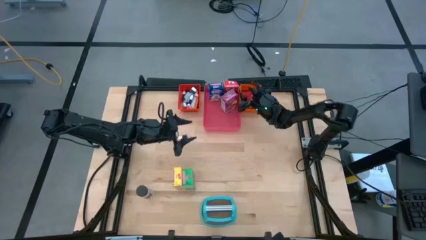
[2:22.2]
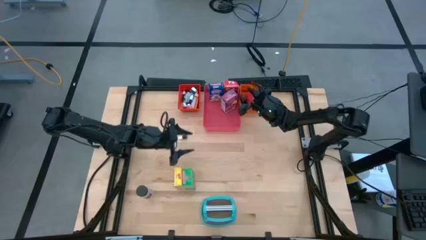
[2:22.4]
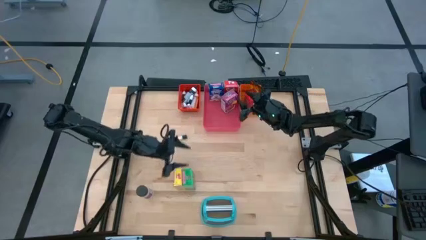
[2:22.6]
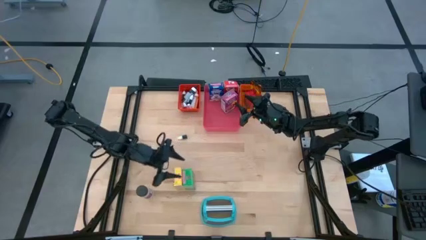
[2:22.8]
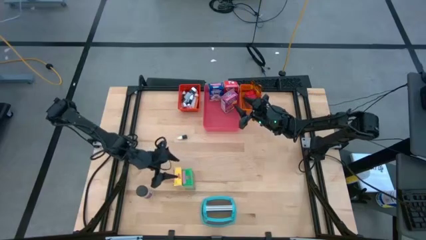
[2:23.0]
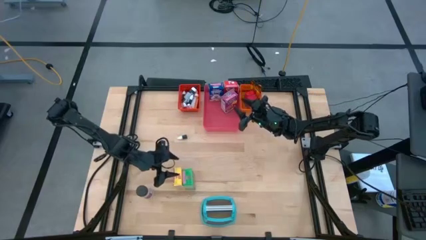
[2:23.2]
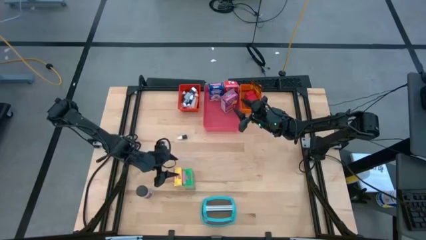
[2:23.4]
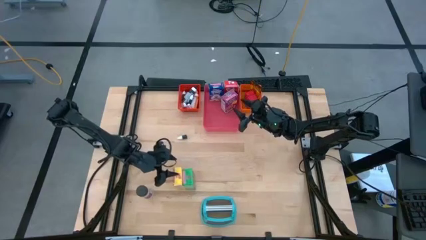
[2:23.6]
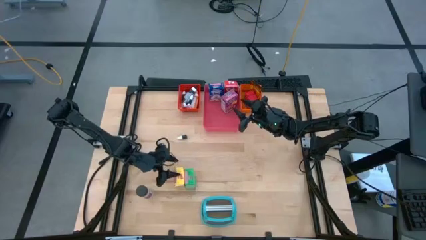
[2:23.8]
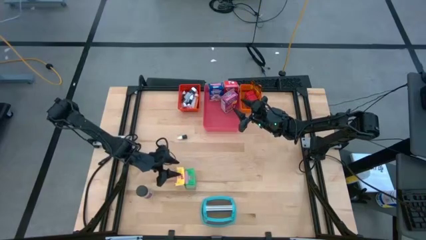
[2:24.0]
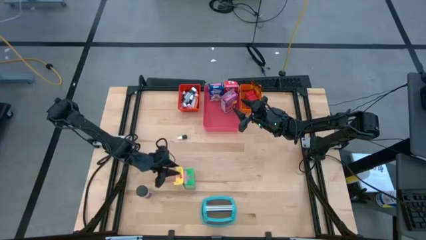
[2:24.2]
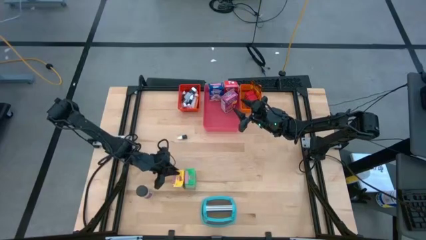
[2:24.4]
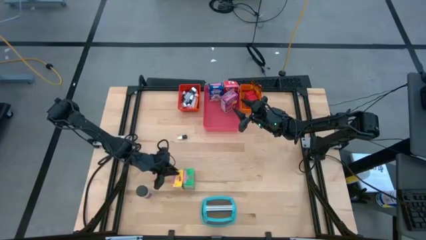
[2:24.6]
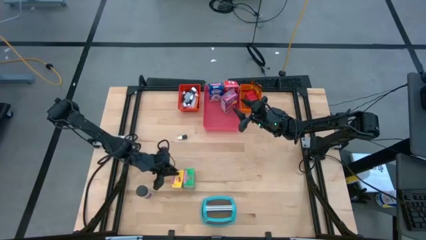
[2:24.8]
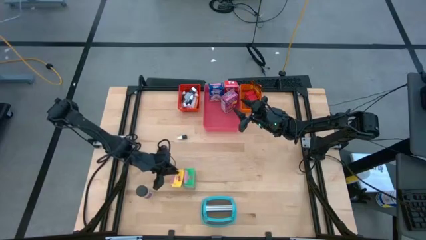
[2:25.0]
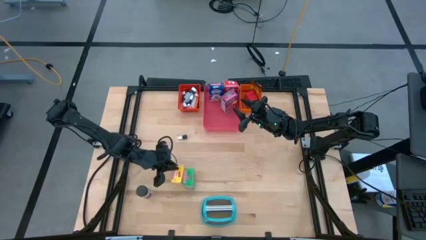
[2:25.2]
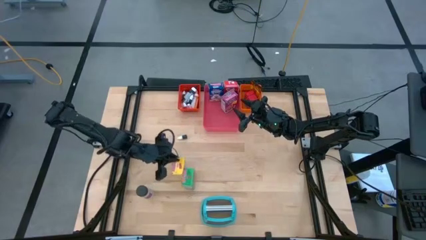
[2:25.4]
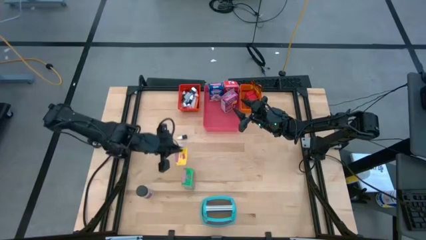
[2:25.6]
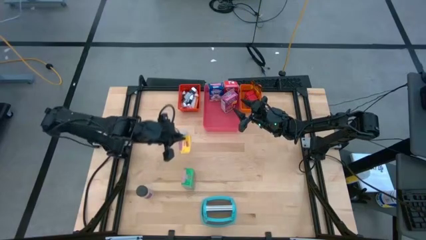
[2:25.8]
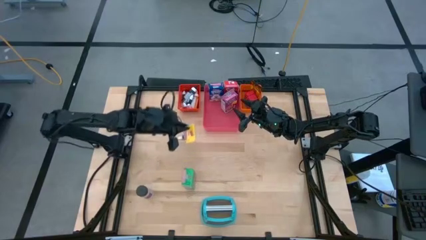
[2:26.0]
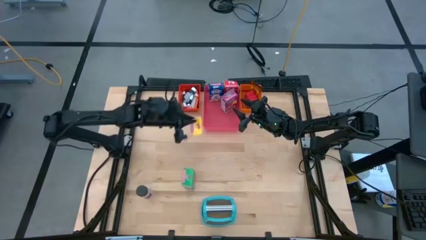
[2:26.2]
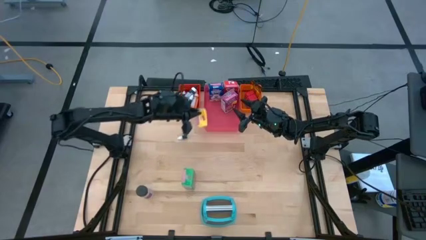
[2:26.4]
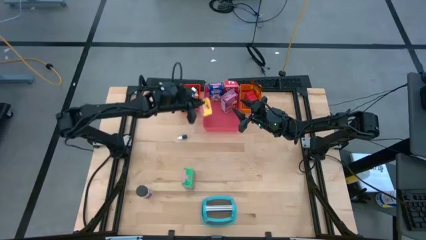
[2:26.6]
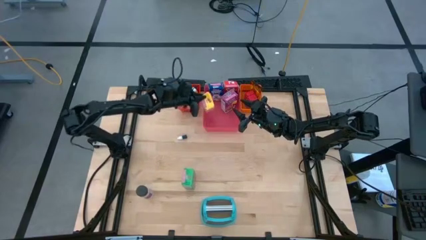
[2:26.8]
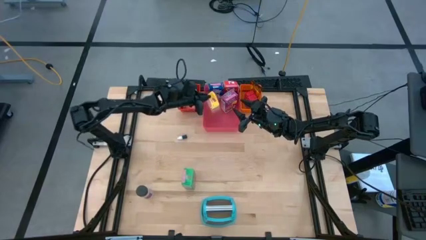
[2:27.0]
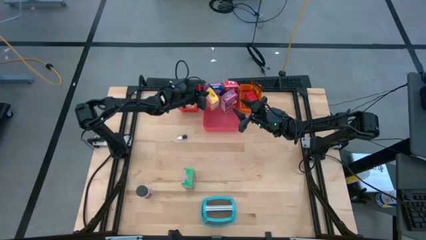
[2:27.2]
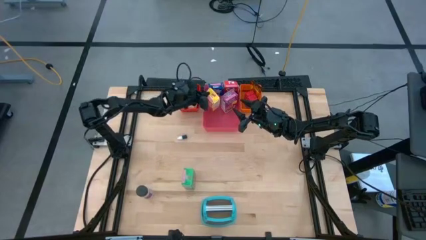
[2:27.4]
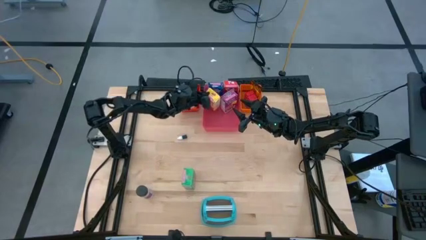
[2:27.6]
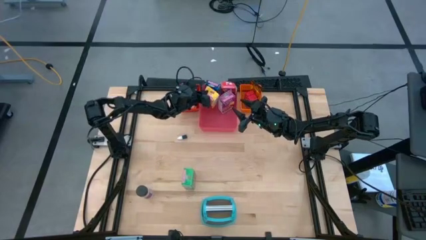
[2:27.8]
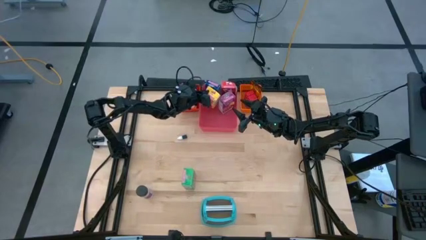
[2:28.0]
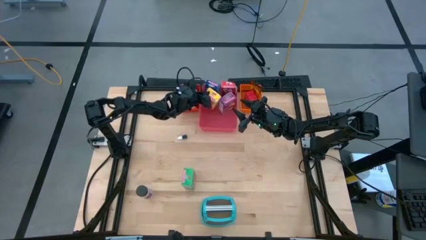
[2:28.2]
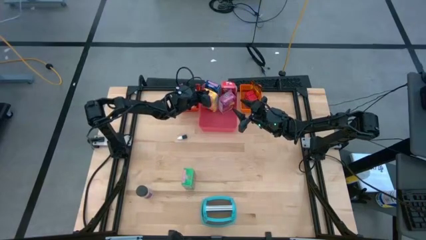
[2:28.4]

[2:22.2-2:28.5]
Task: Pick & Place Kitchen Items
Put the yellow cereal box into the pink bin

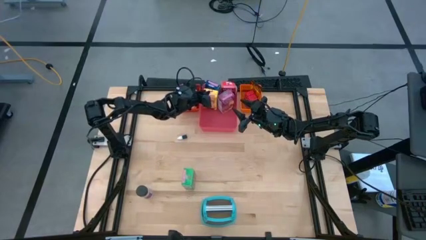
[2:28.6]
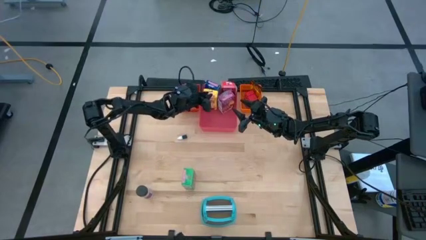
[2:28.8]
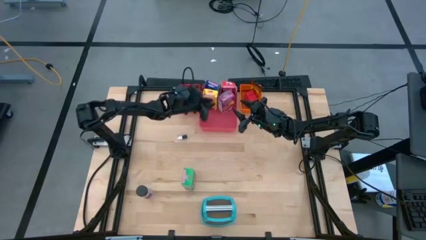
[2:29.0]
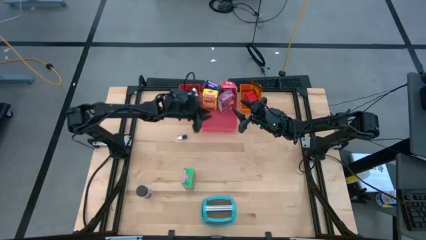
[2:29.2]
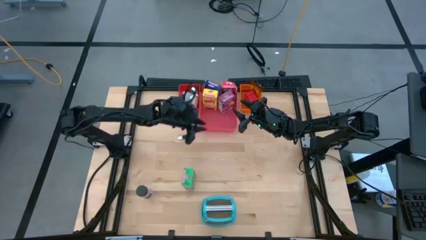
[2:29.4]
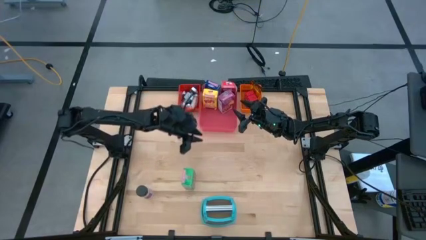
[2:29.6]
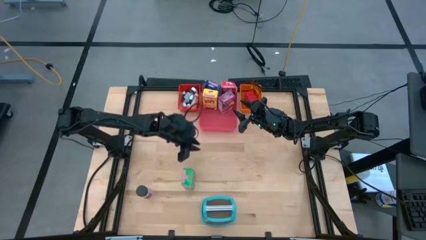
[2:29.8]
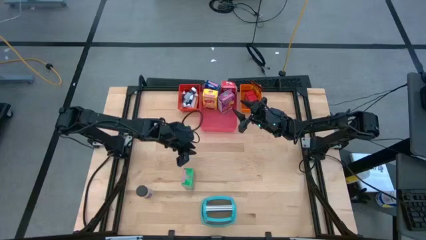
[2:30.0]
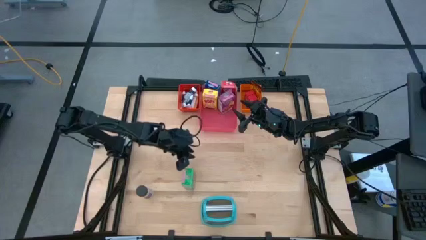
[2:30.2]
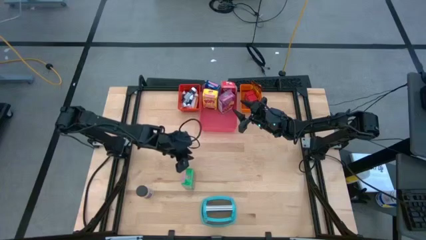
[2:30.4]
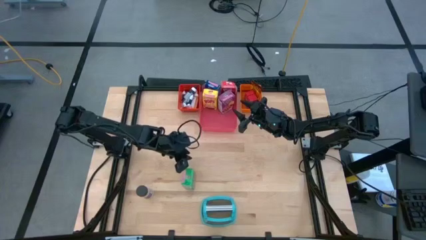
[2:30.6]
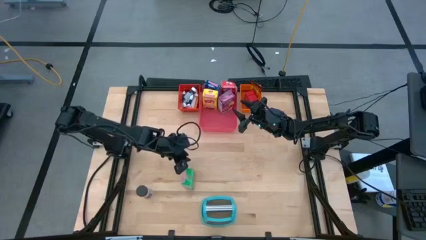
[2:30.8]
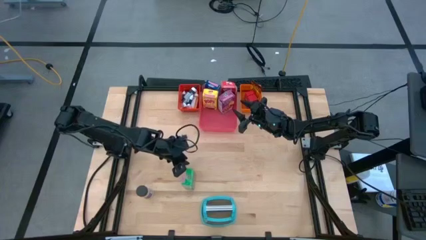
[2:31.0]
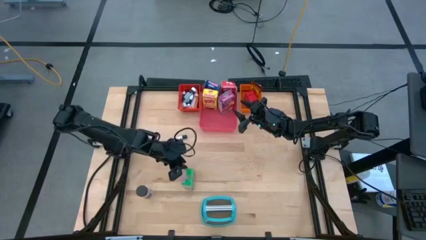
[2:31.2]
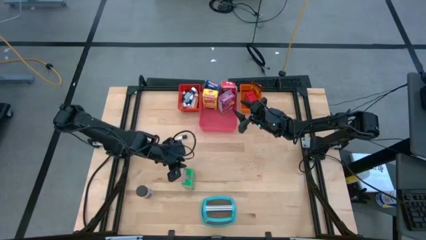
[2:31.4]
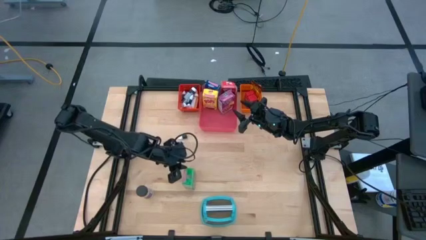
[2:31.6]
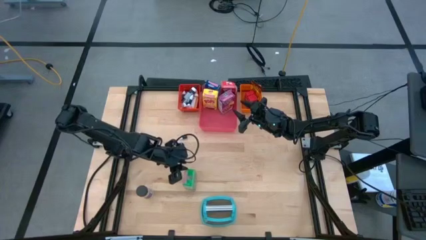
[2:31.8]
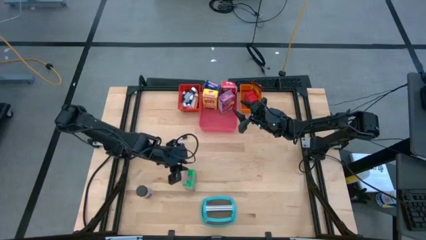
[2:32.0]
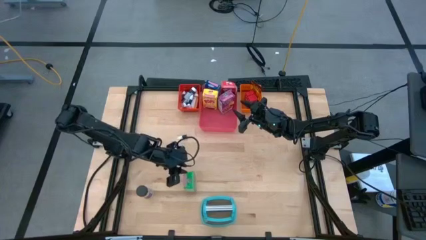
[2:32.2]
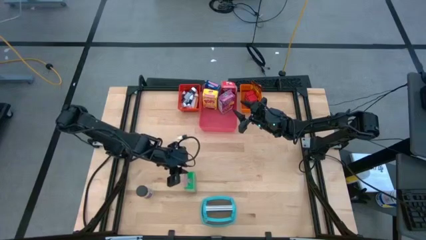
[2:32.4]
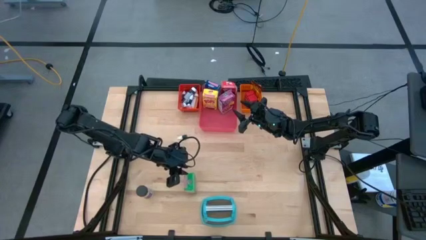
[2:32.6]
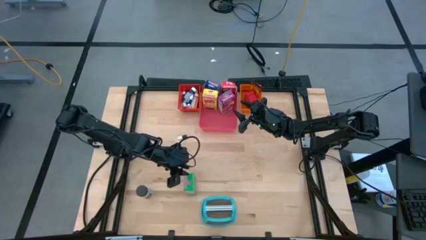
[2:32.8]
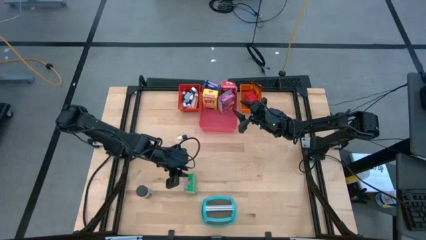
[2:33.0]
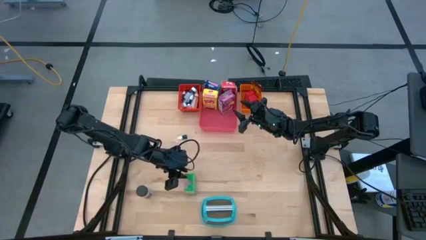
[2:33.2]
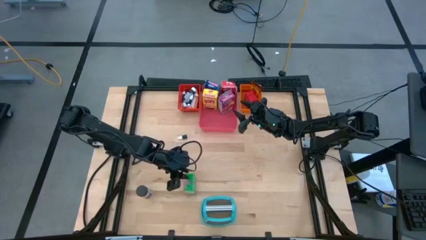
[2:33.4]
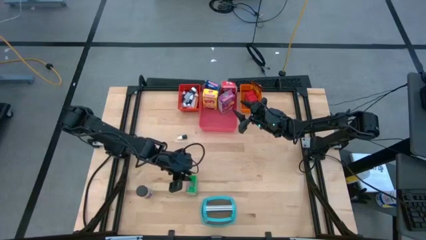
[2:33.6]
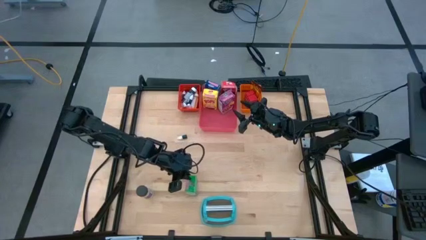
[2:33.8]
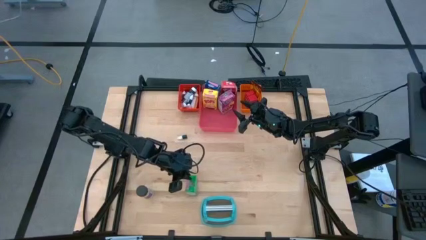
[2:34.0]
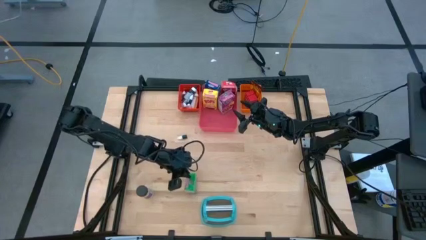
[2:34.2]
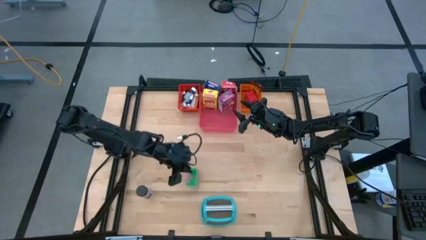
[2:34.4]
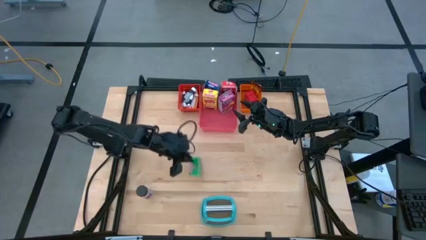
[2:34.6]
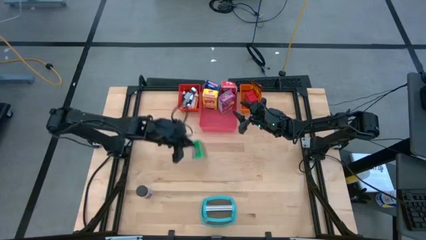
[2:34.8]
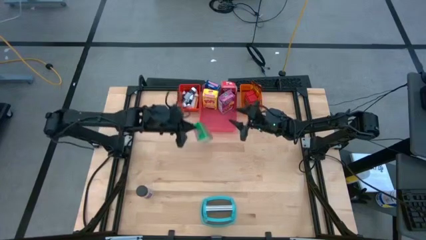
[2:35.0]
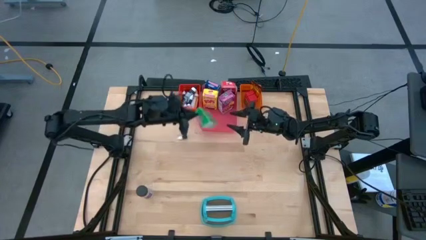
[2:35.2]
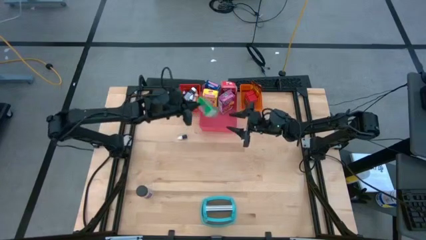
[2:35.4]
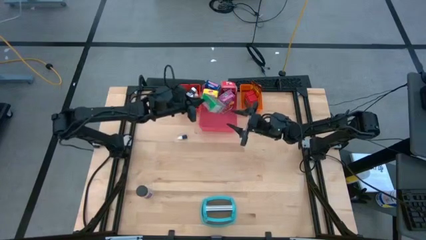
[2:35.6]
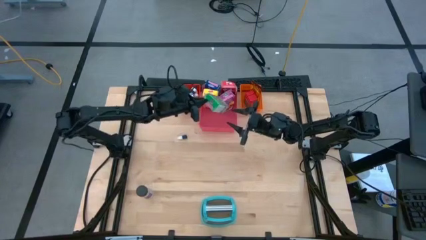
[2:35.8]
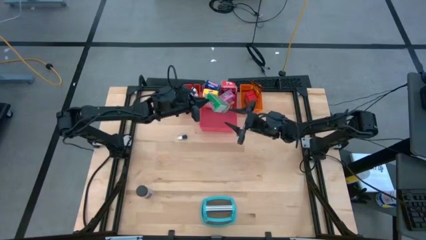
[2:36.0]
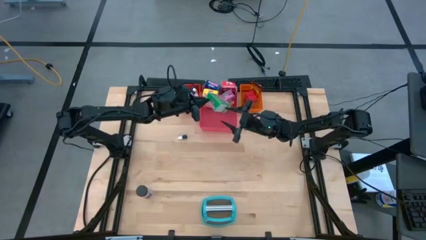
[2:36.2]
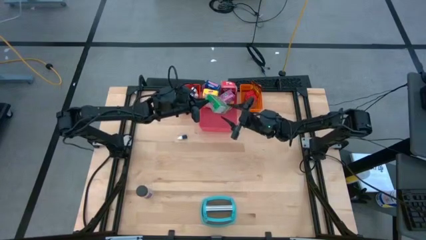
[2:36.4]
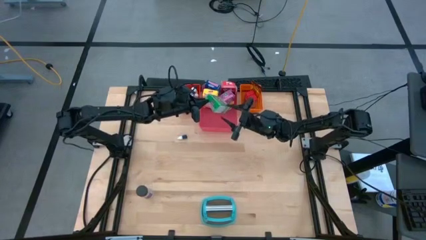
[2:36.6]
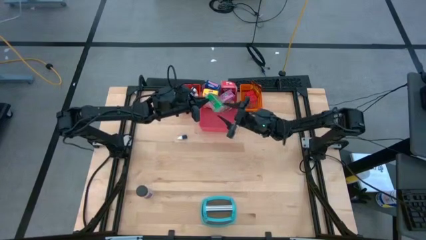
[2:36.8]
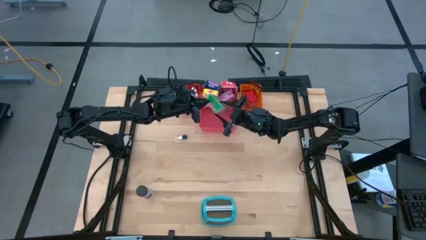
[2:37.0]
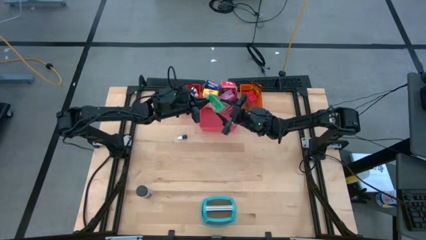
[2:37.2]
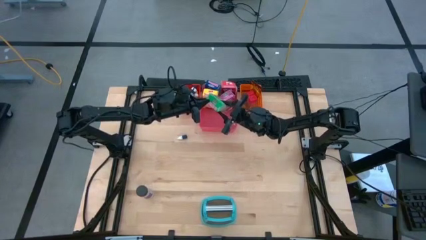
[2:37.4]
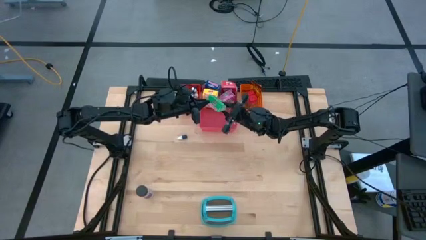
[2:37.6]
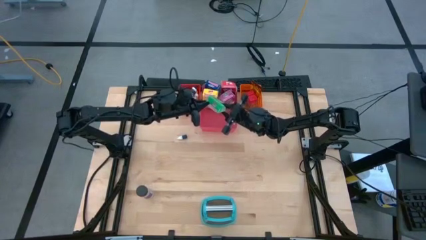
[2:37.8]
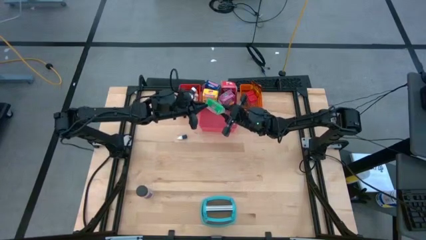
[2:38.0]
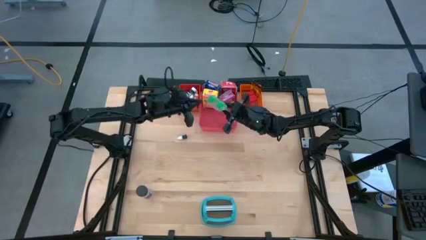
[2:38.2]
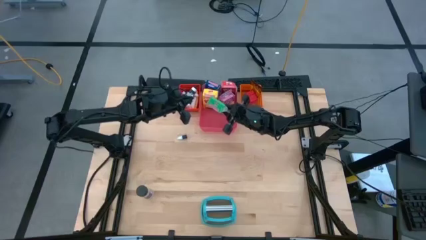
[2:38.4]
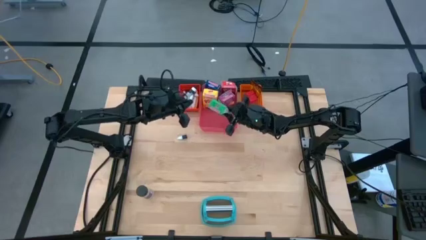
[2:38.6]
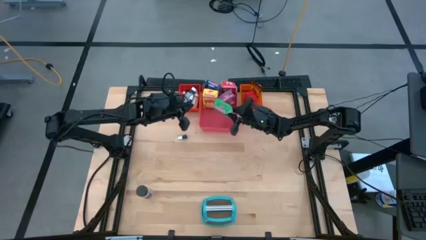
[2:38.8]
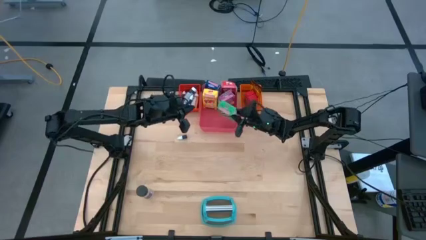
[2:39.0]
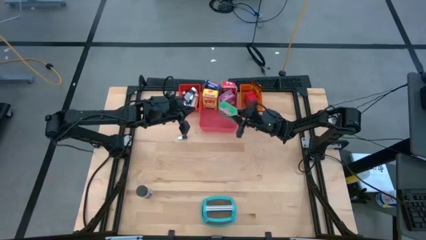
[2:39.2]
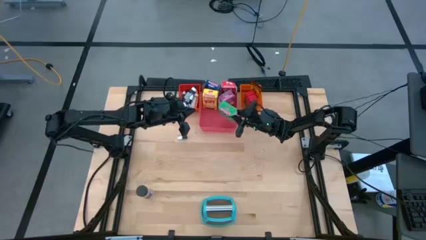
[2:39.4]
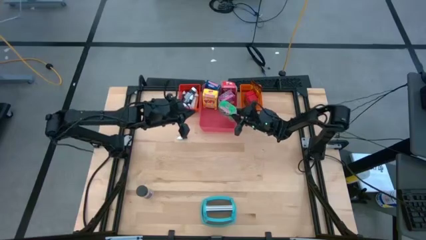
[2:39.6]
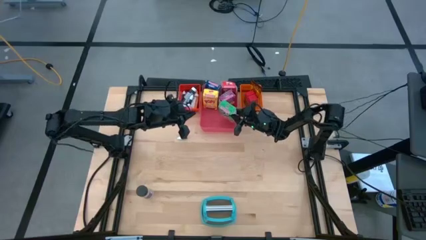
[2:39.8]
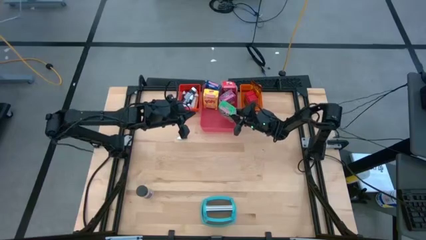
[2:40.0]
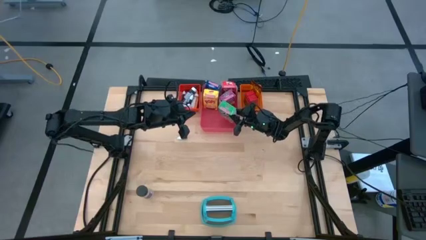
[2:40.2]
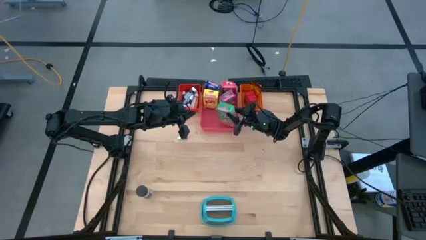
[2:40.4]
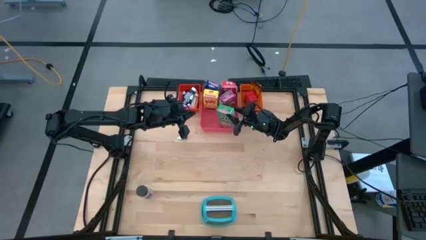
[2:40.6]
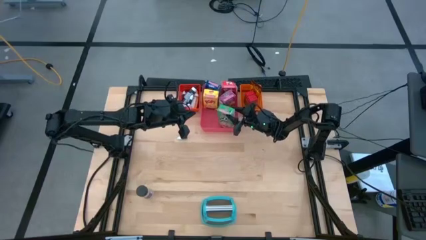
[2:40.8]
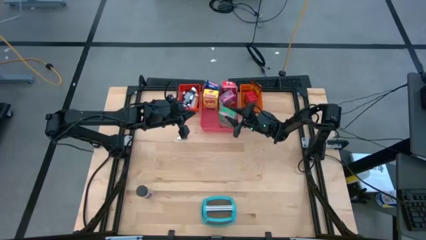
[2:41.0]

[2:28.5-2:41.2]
Put the green cereal box into the pink bin
